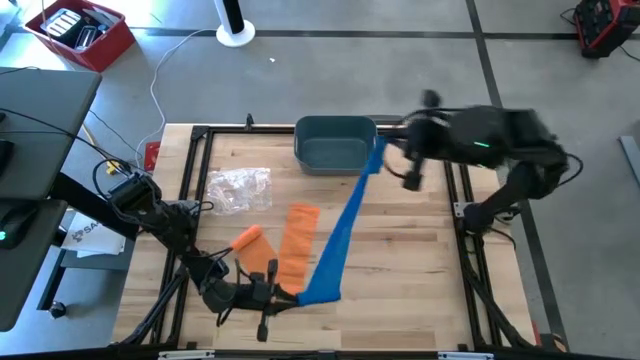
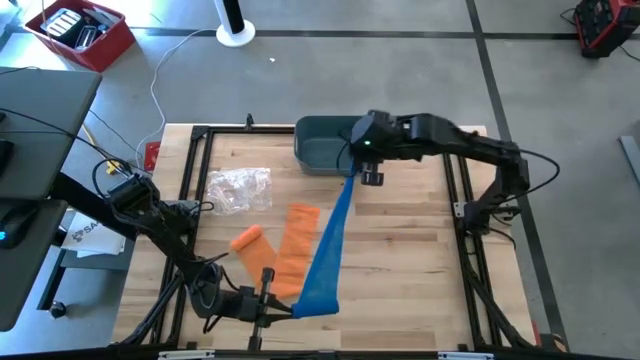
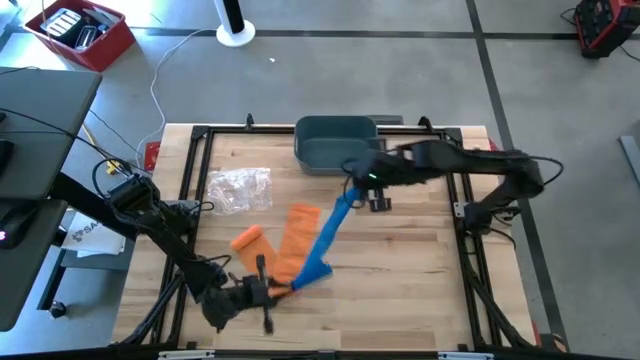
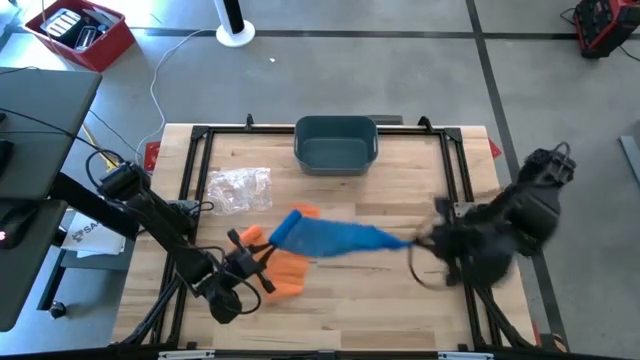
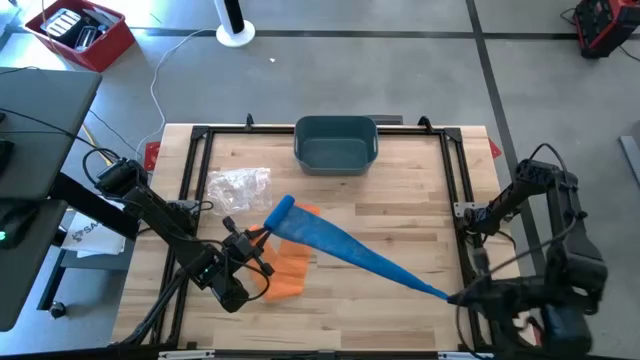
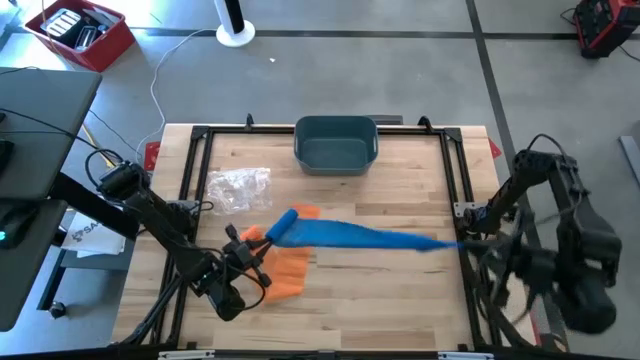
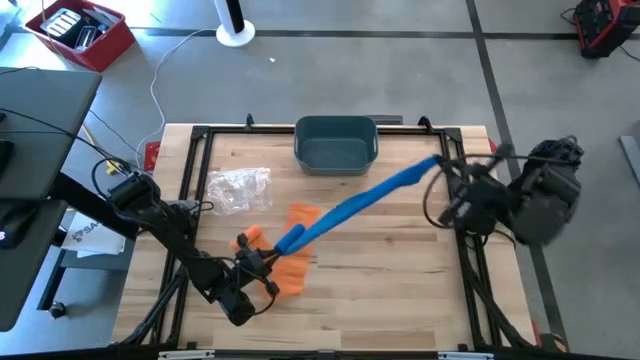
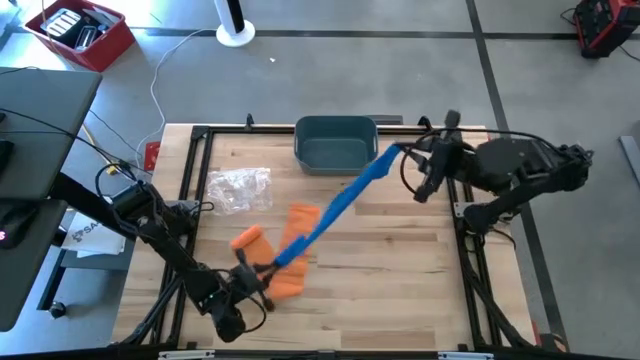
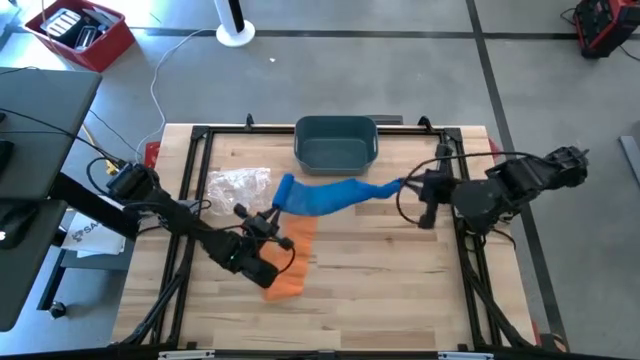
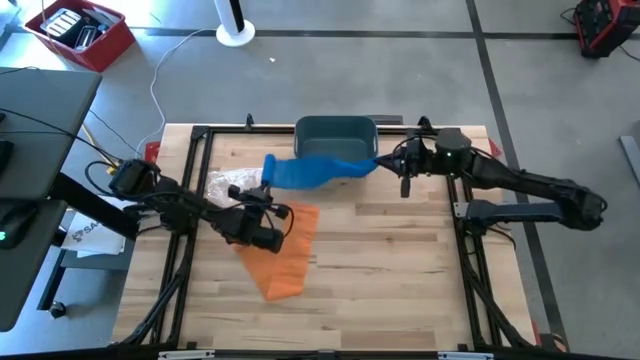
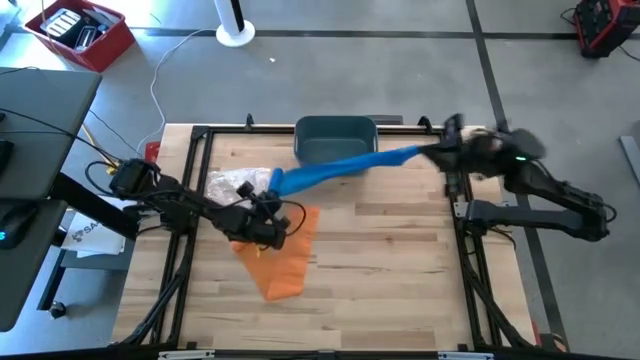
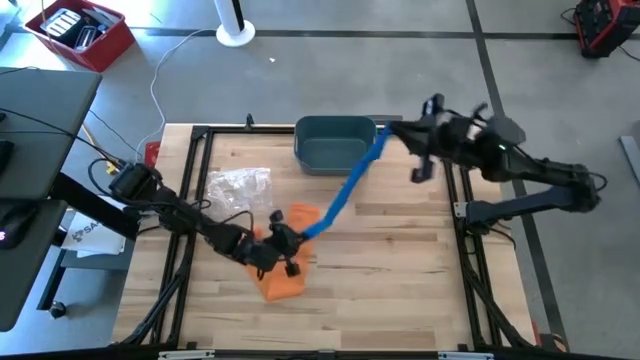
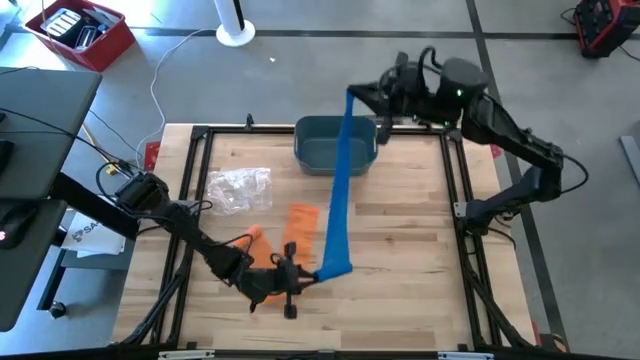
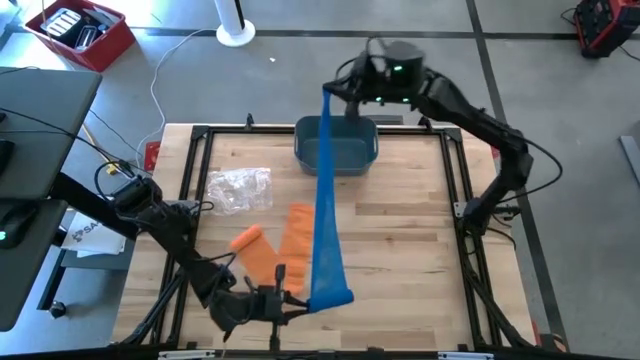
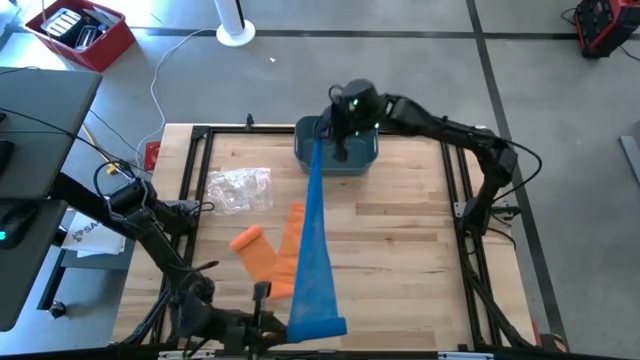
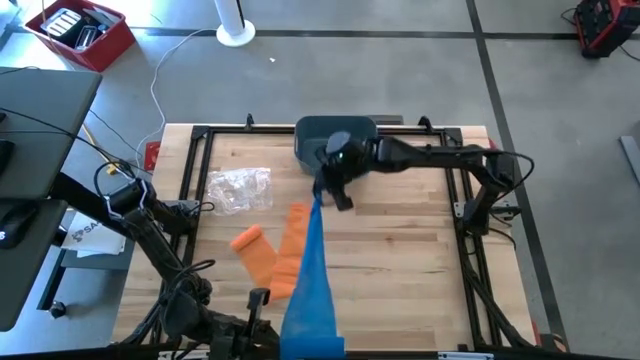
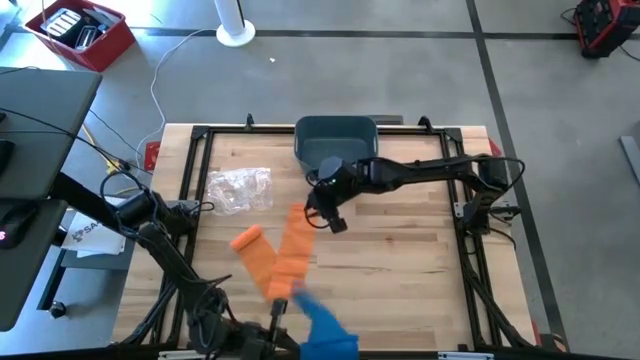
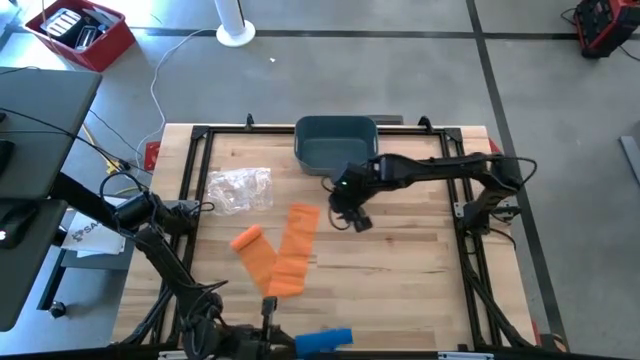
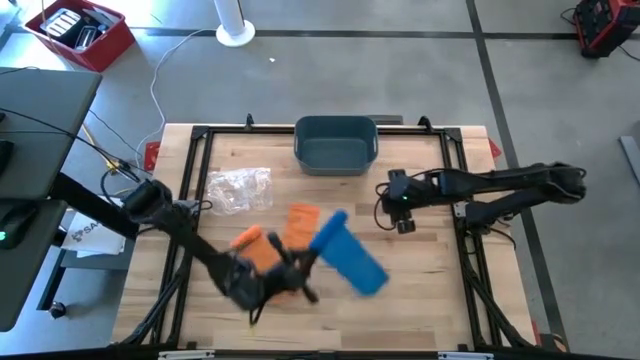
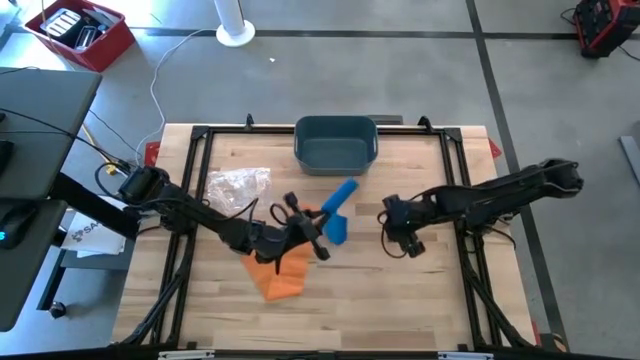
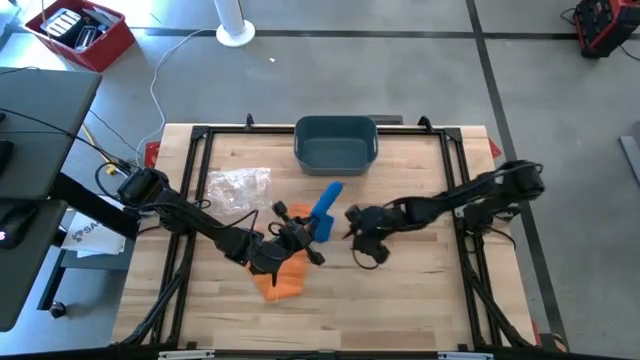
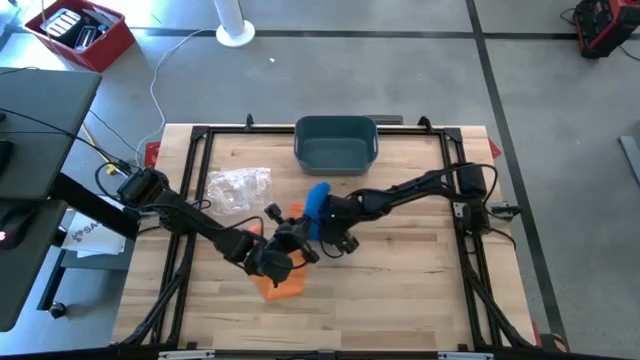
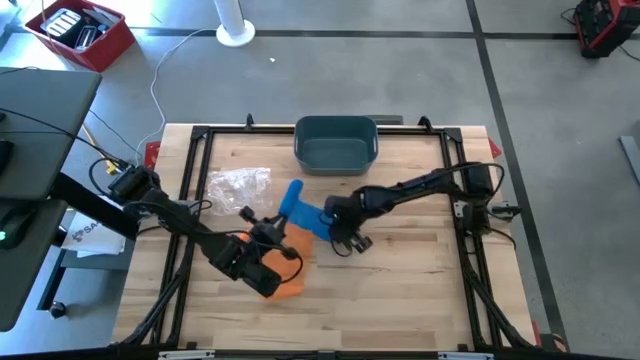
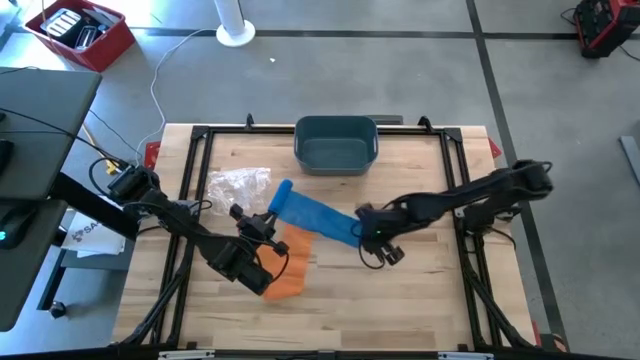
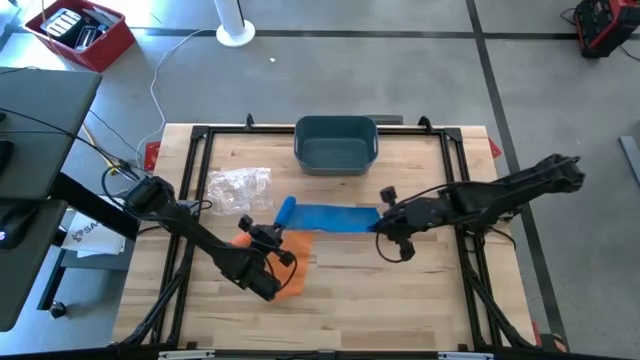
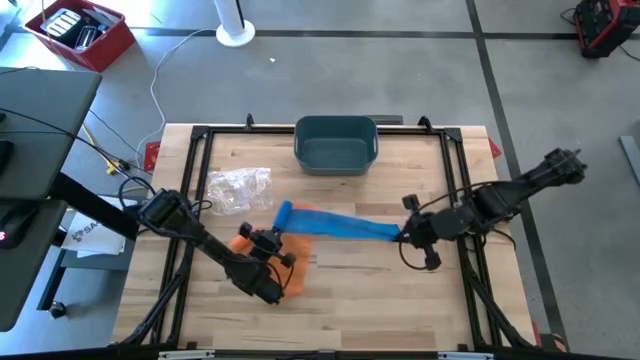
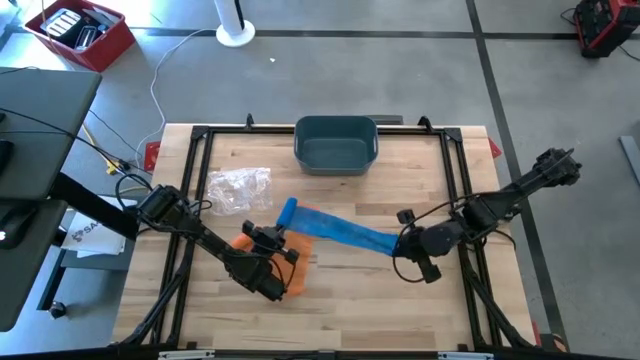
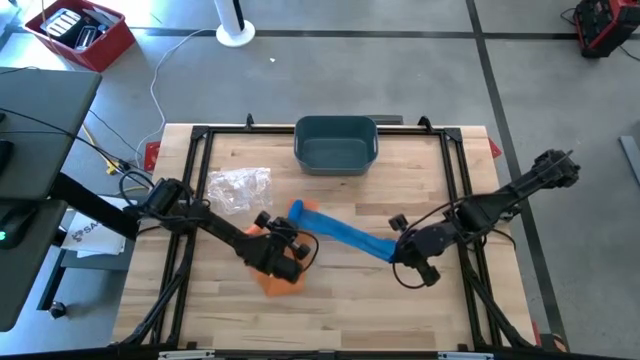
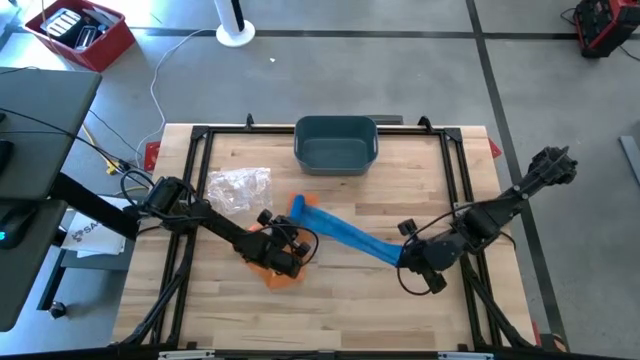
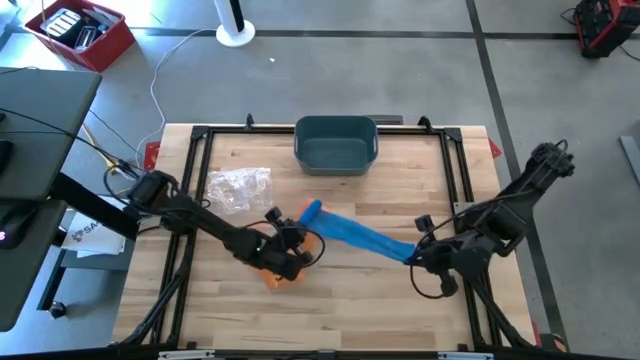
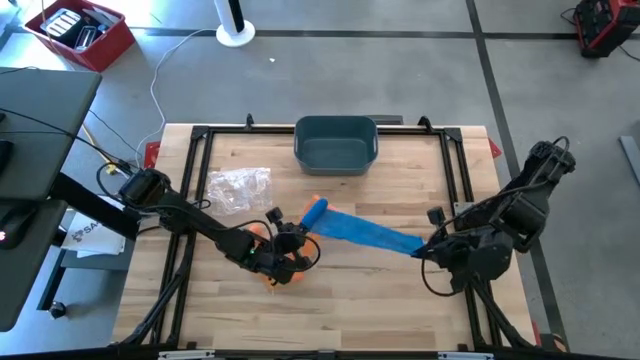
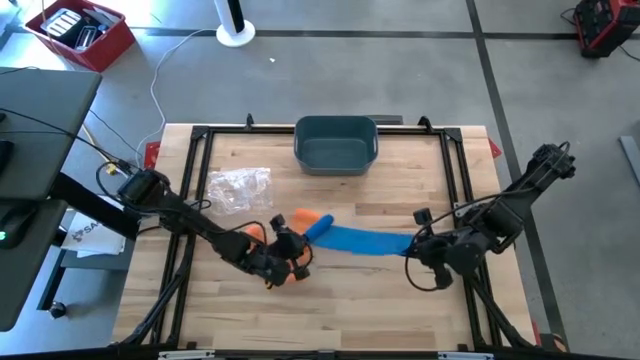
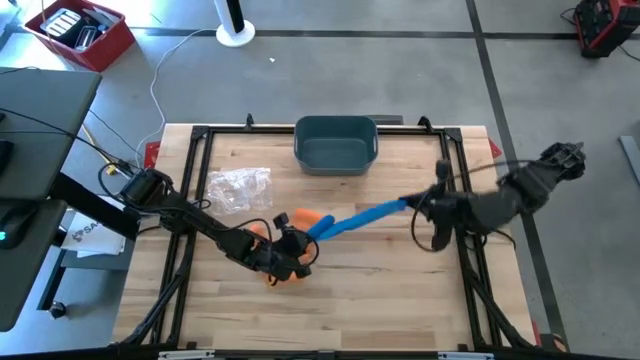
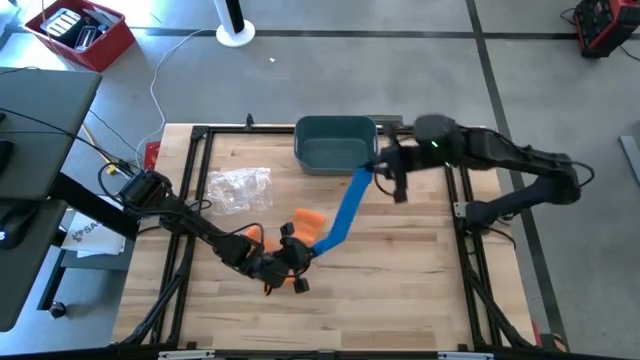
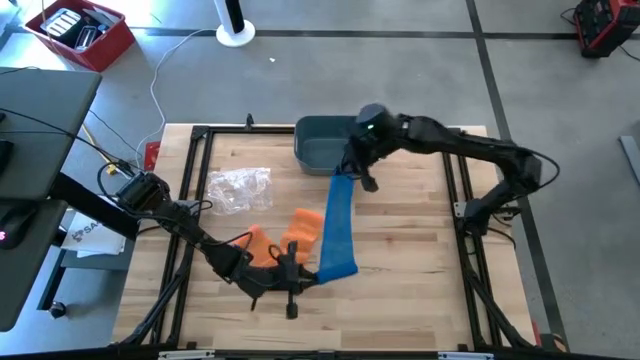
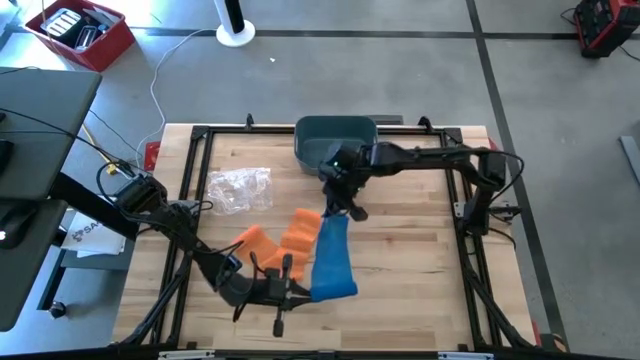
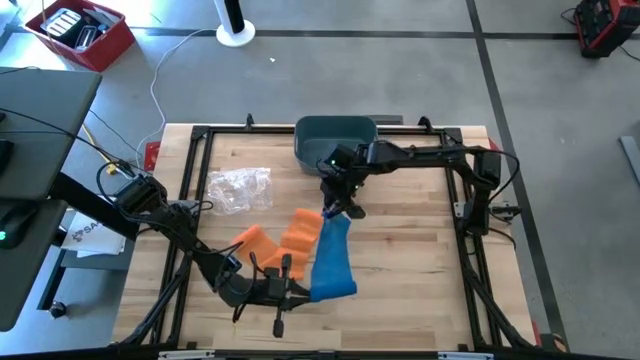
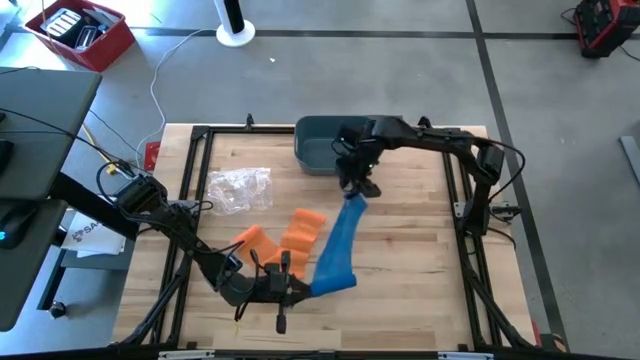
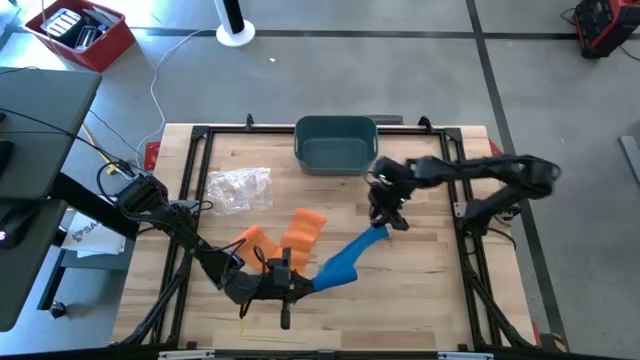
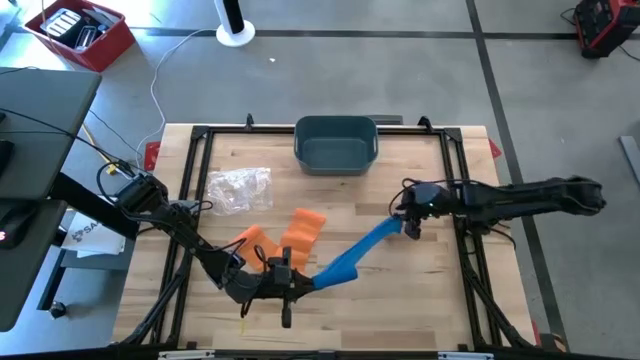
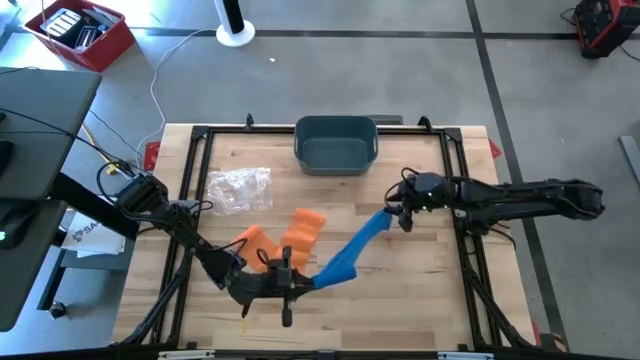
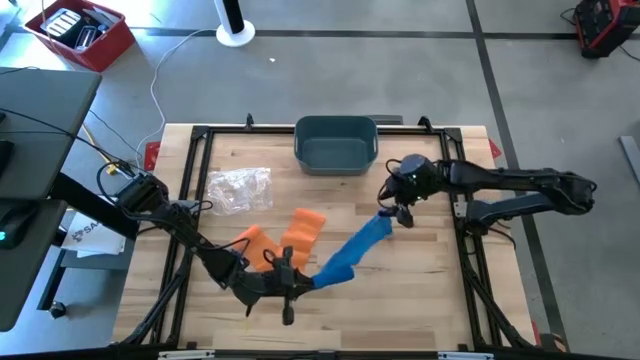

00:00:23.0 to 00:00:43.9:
Task: Roll bandage
Roll the blue bandage
